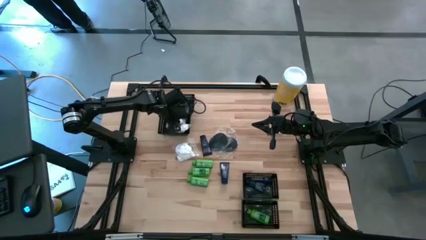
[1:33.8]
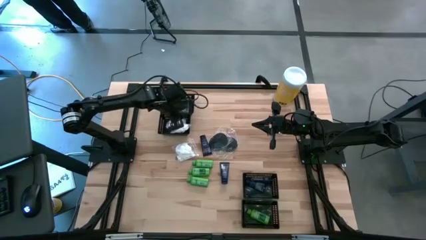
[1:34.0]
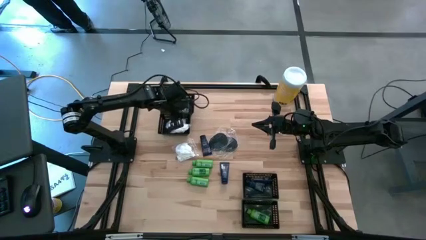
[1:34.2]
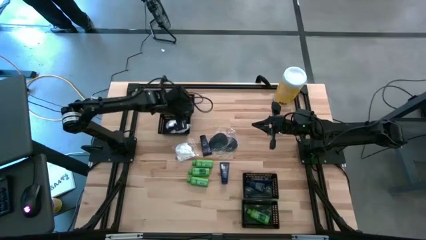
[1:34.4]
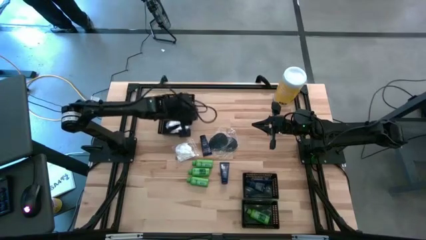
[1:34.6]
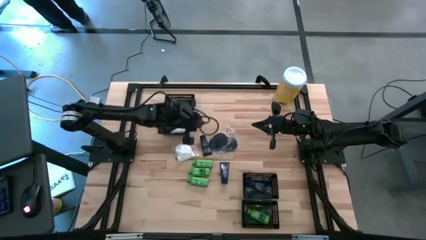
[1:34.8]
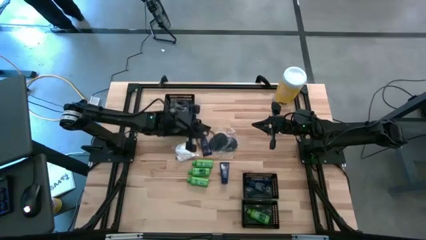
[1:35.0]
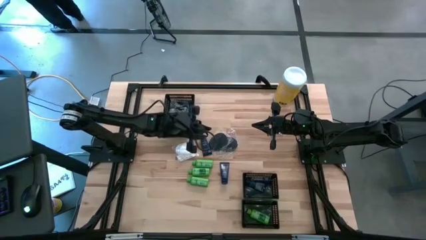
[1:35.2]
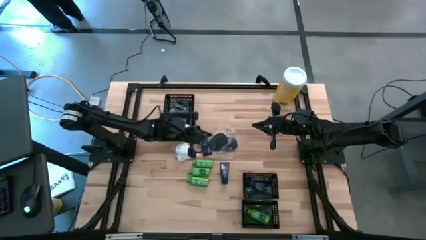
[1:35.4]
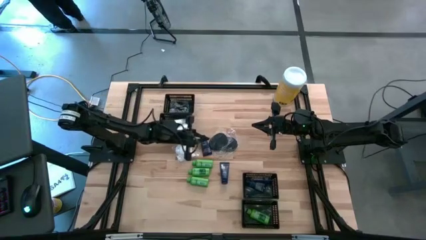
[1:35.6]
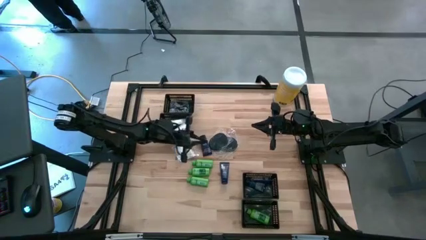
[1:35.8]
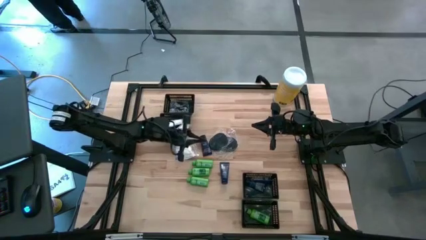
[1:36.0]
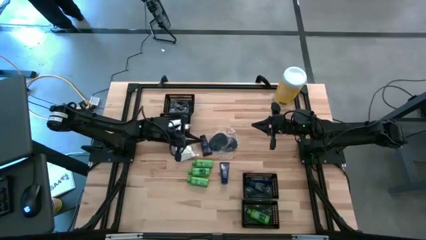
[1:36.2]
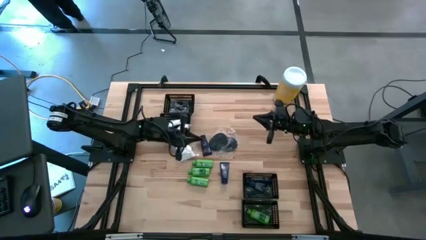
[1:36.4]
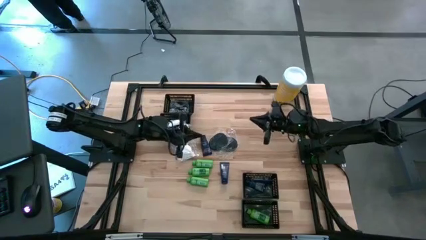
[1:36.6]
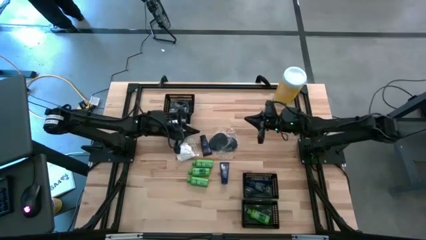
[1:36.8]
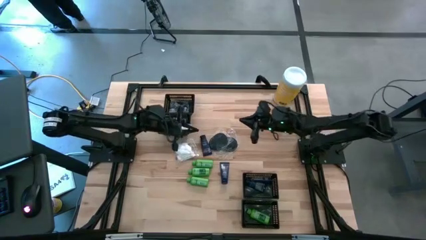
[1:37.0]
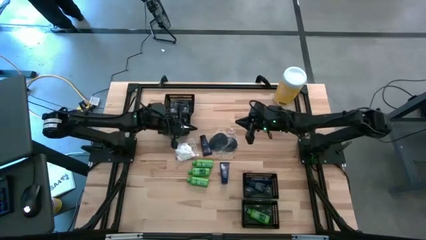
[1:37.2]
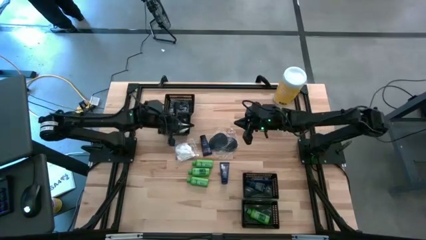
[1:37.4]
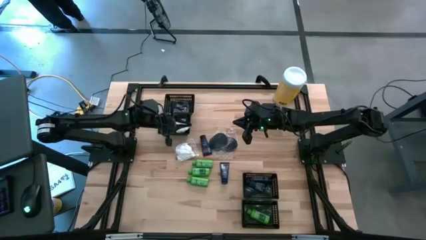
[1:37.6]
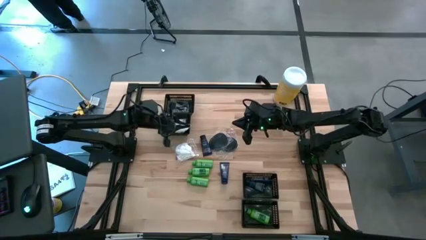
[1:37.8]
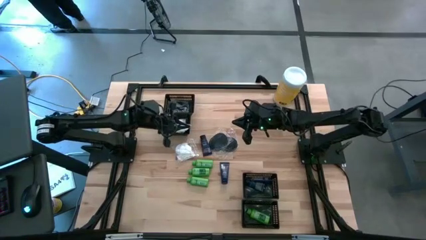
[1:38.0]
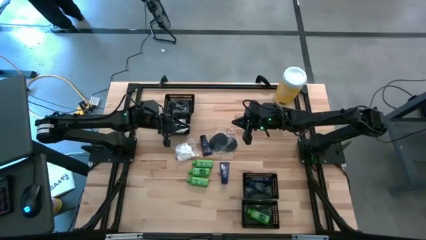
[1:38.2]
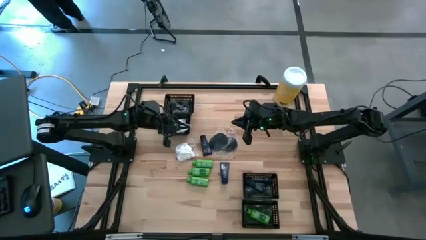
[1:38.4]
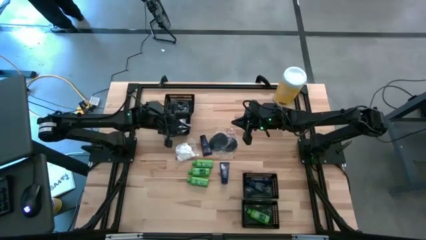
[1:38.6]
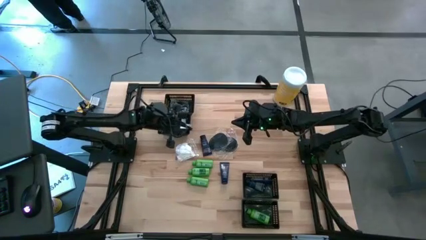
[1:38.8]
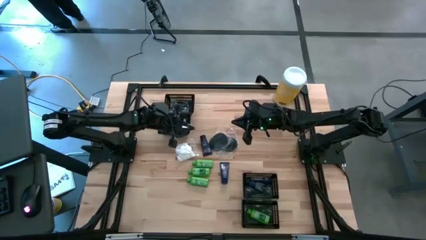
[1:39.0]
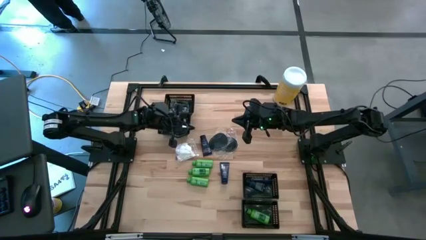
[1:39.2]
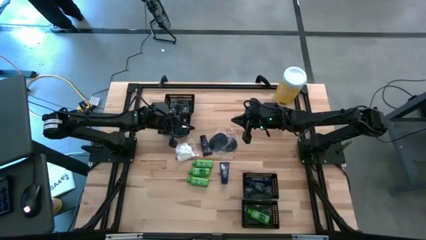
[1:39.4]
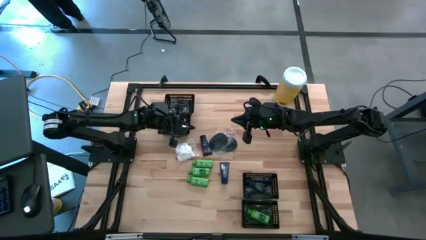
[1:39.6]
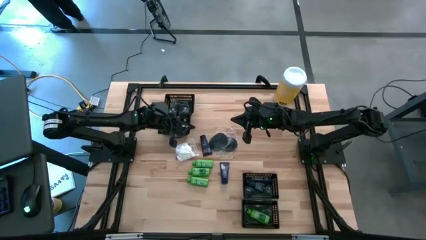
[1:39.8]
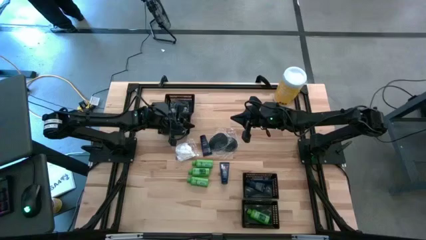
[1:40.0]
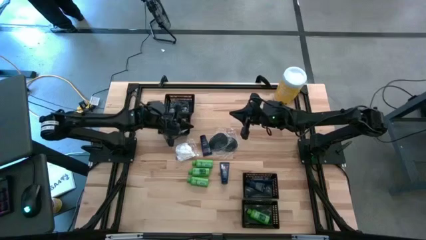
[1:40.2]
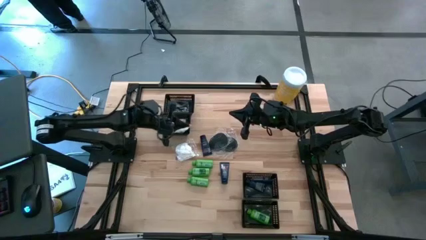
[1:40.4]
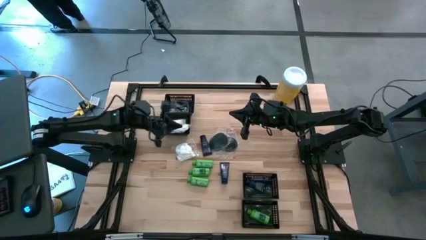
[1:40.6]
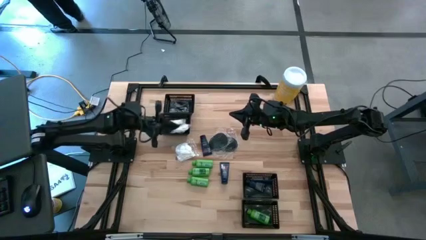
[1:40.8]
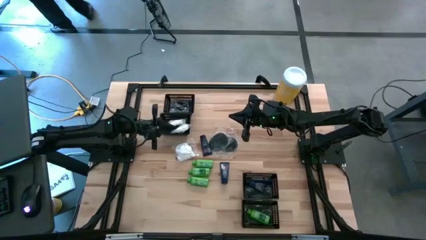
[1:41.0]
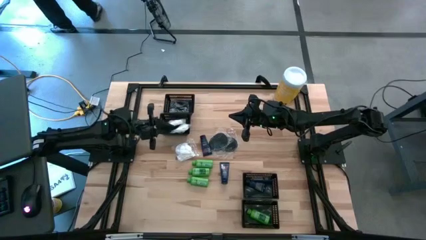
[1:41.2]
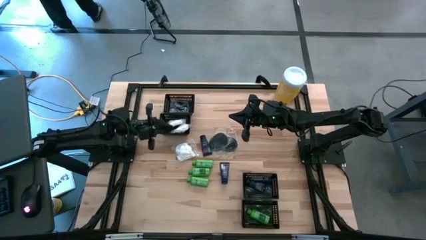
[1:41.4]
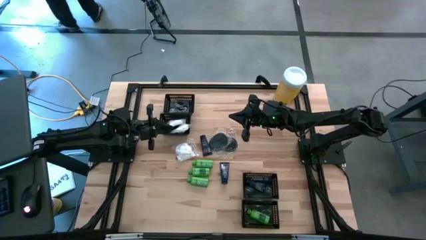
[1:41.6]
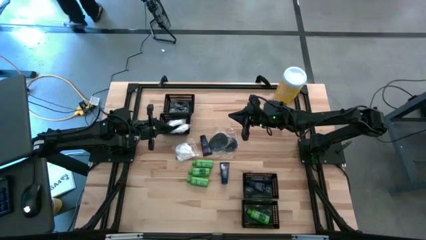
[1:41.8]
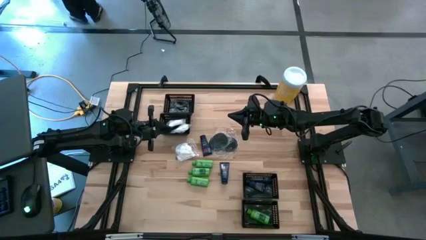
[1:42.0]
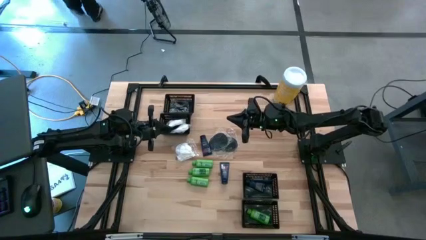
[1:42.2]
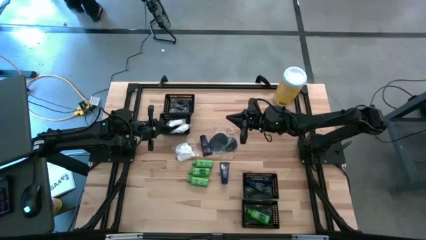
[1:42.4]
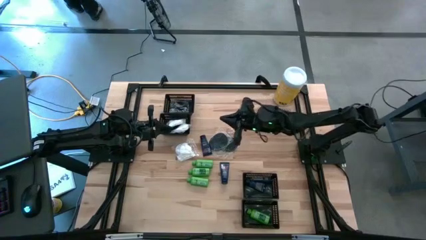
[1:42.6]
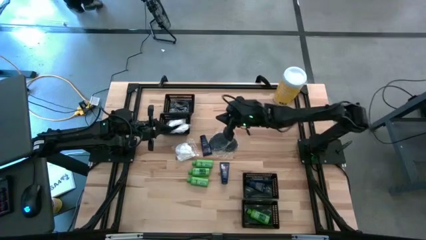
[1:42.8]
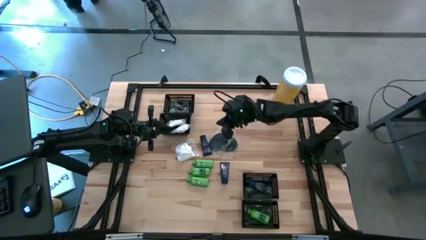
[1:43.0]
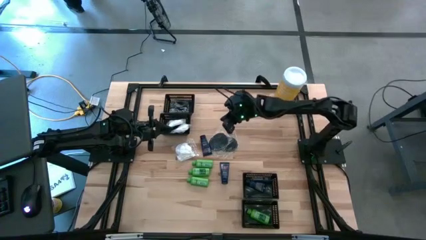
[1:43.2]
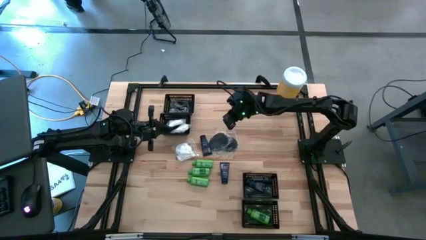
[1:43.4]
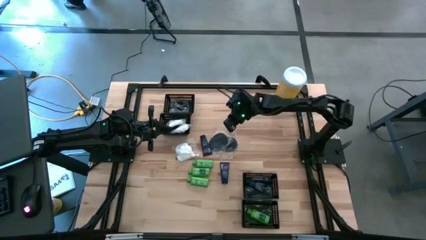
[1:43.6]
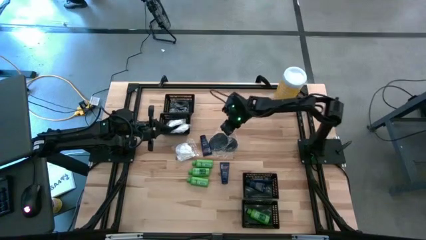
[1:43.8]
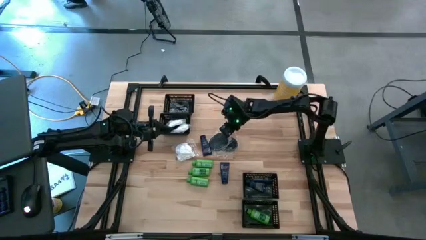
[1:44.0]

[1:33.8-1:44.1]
Task: Pick & Place Travel size toiletries
Put the black hairbrush into the top black basket
